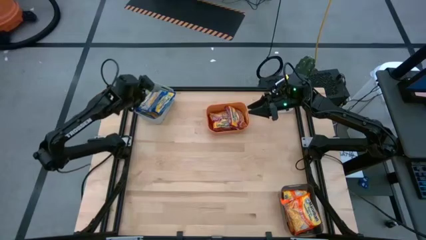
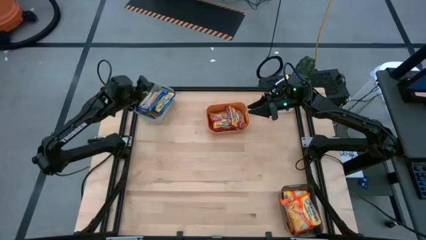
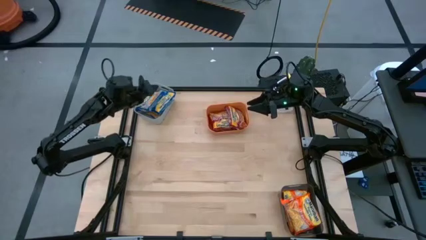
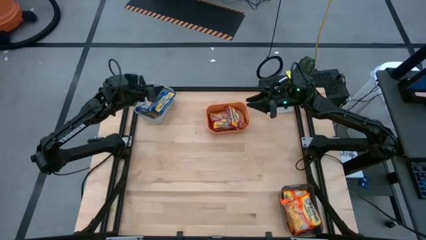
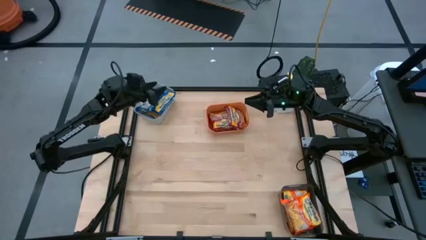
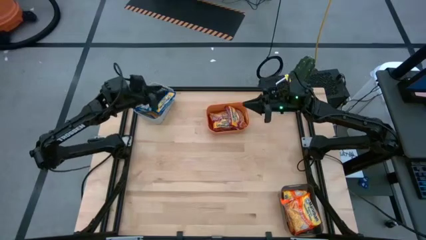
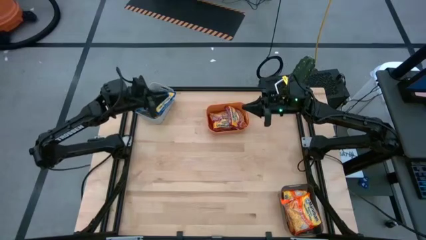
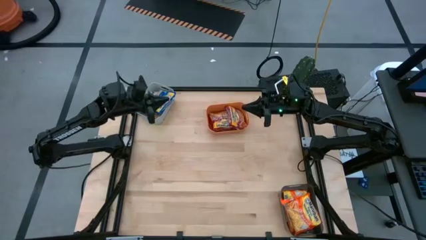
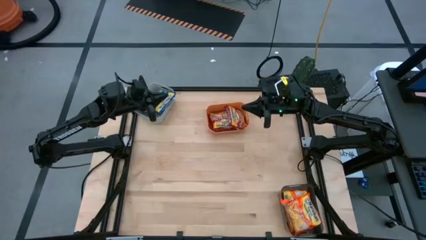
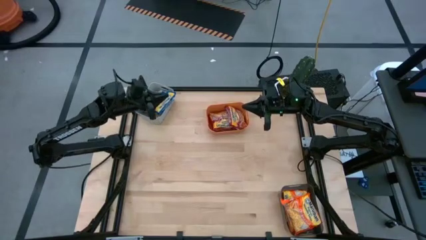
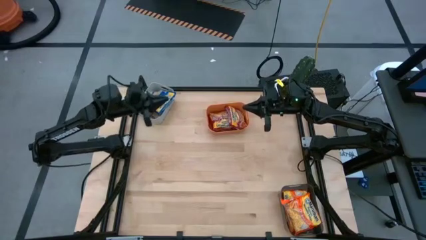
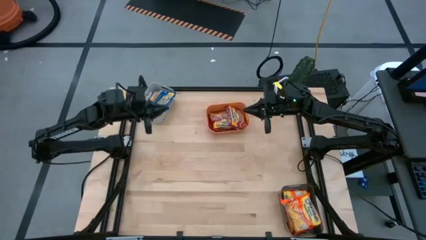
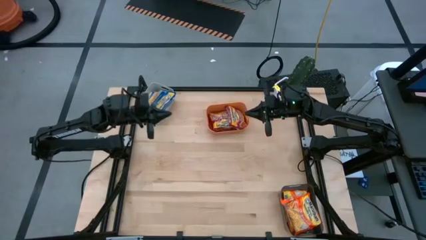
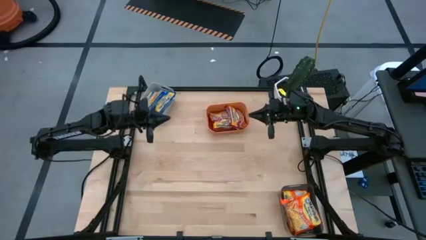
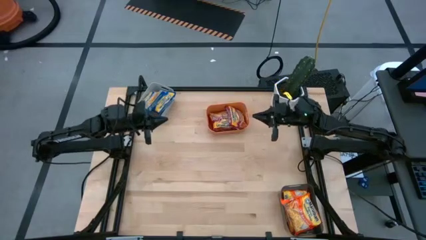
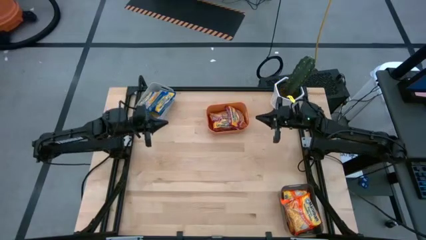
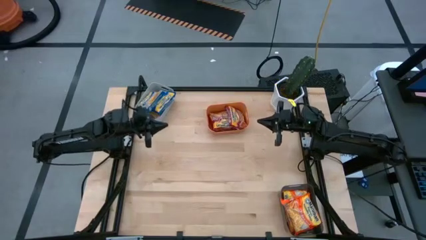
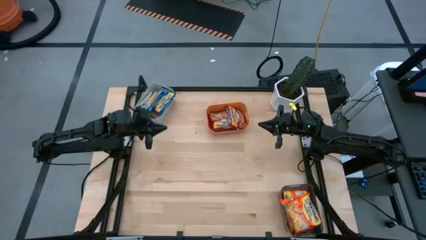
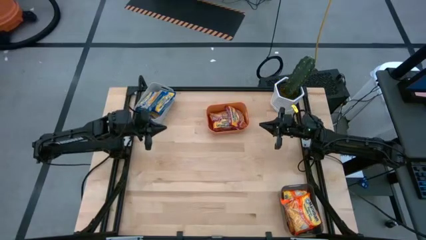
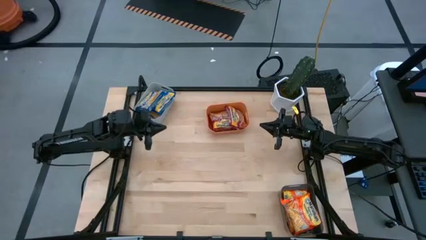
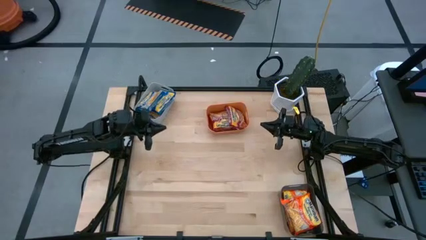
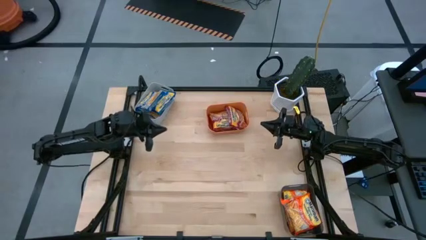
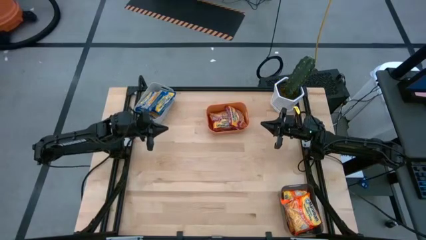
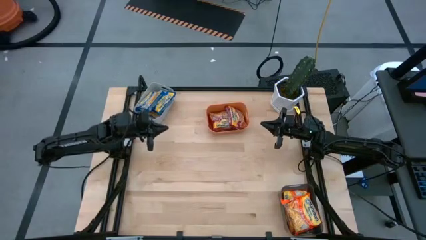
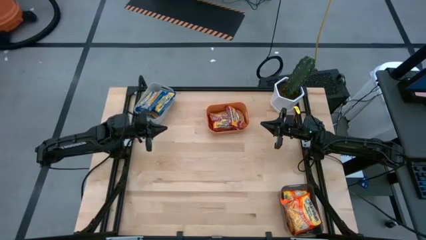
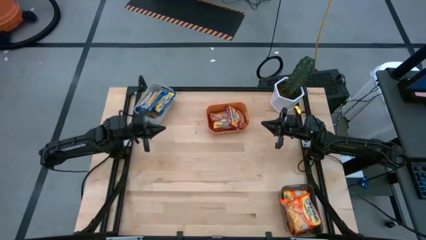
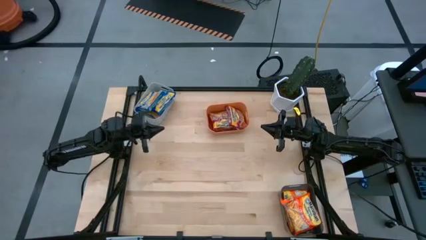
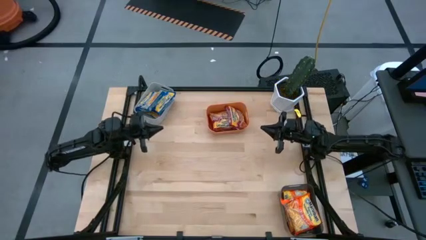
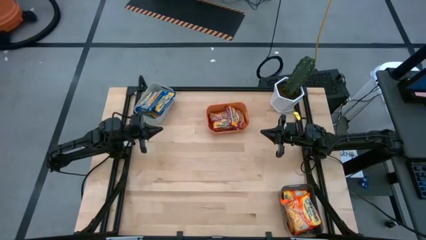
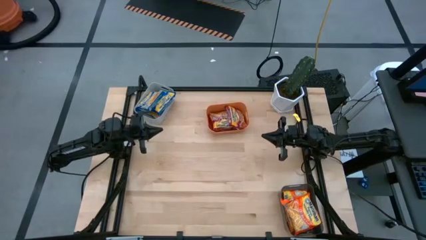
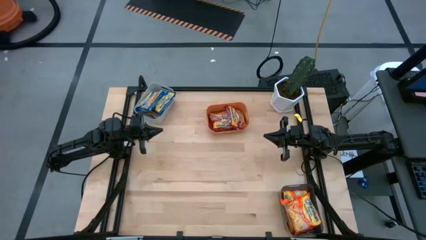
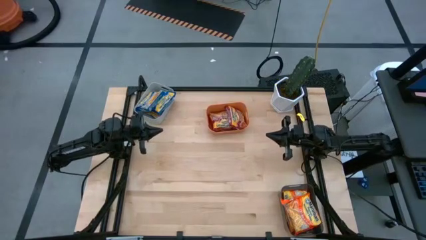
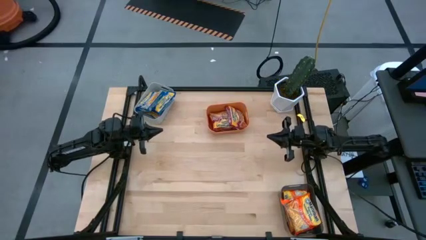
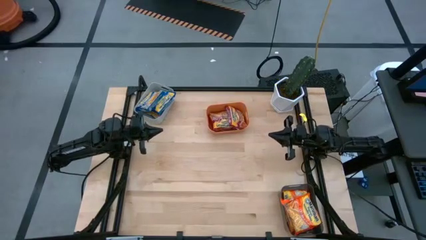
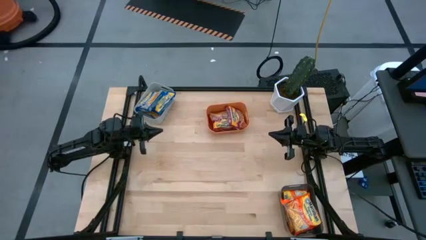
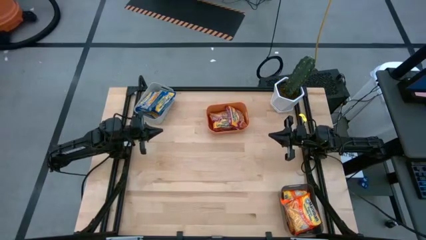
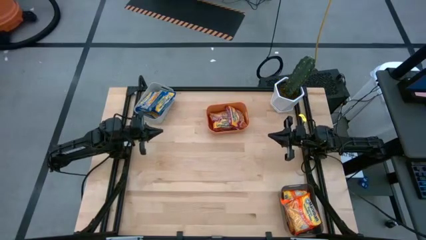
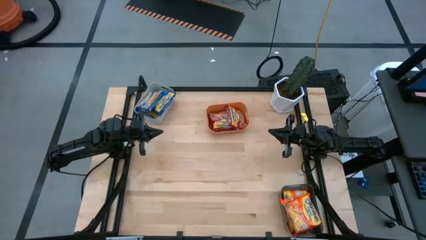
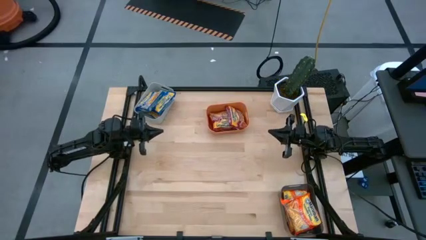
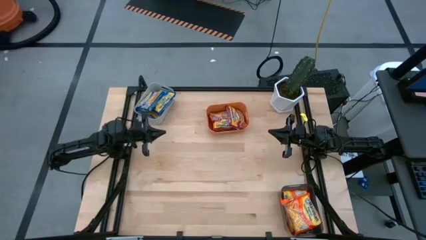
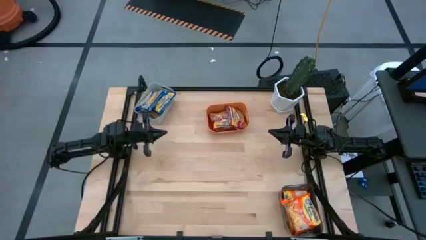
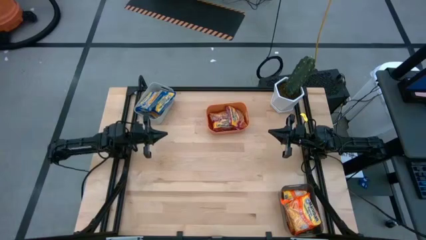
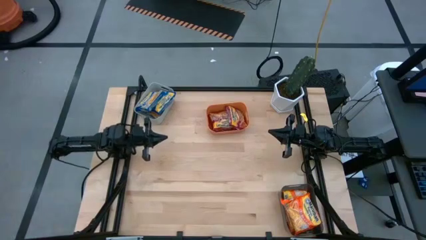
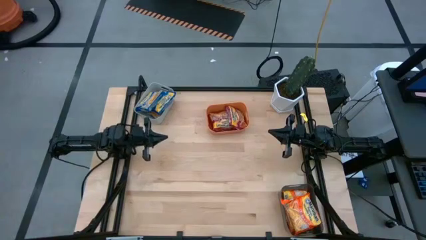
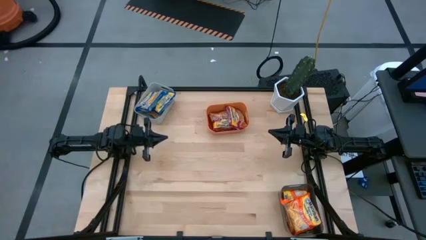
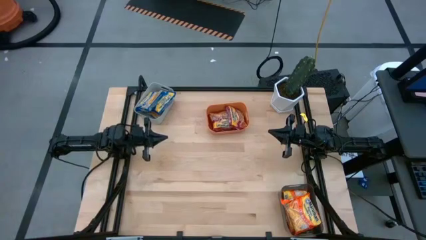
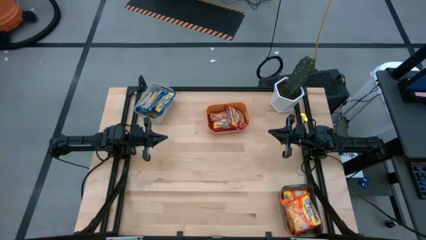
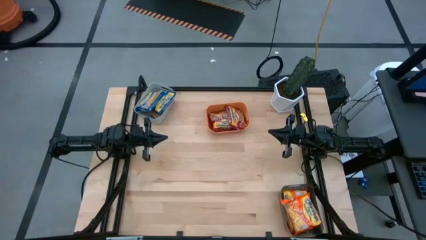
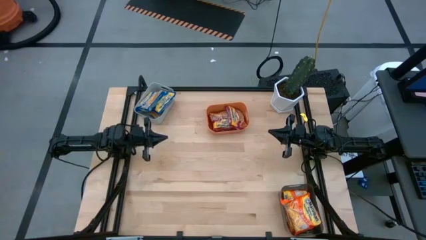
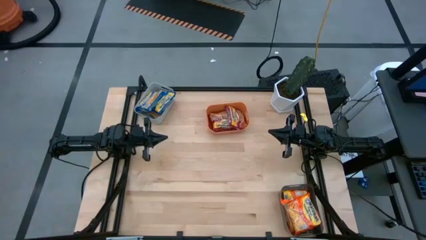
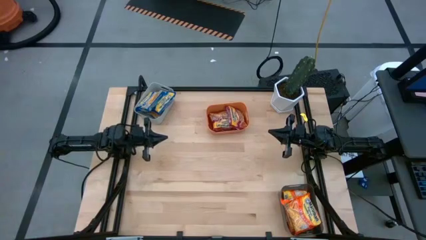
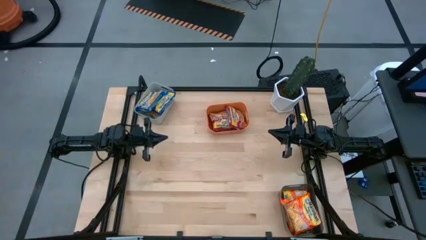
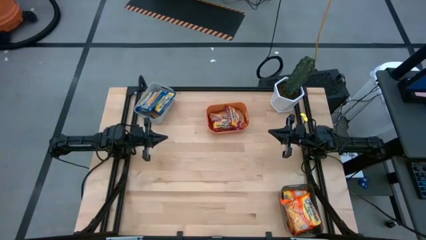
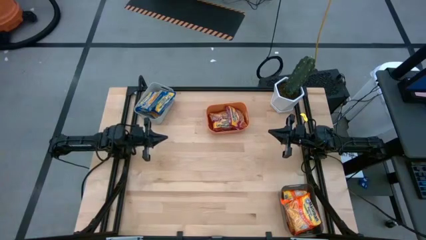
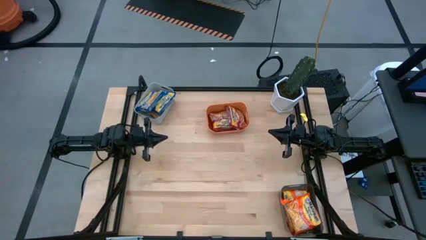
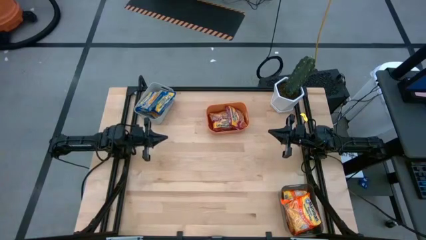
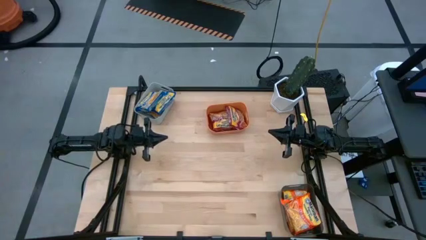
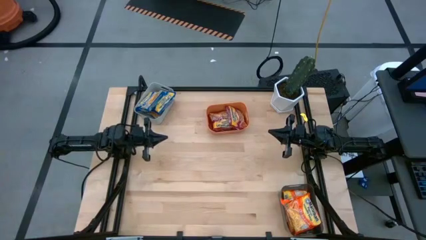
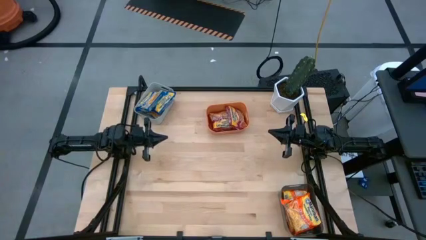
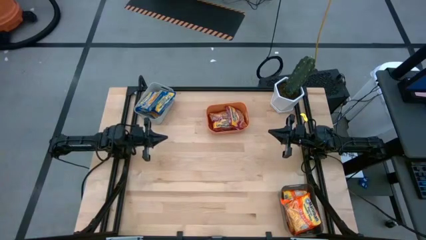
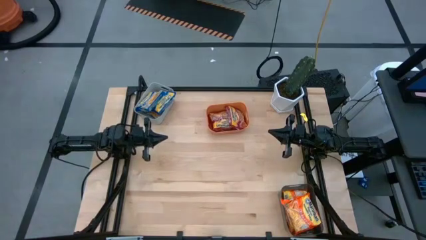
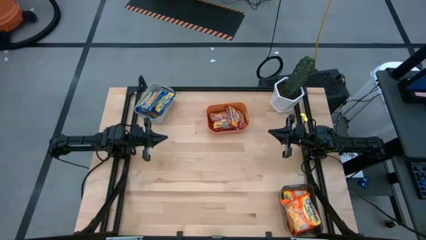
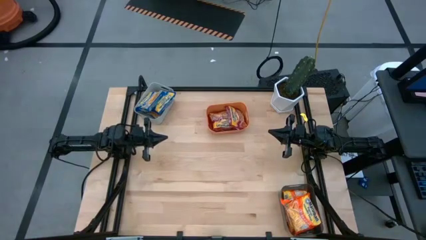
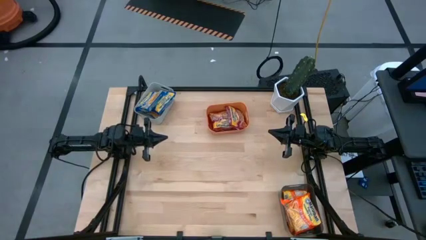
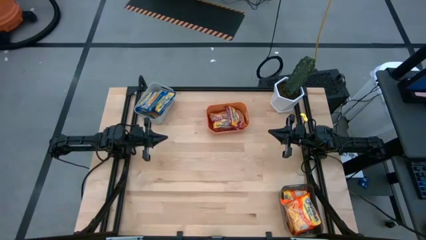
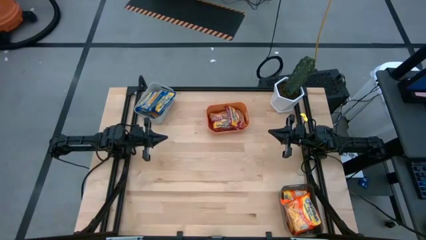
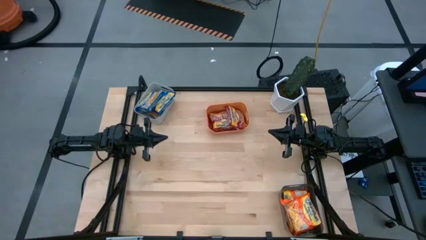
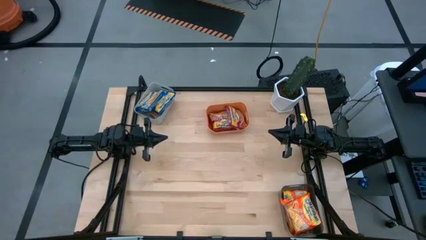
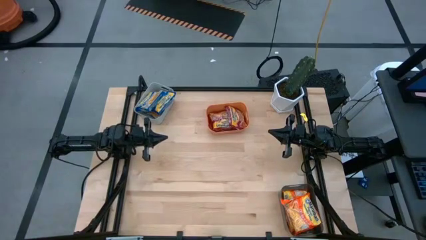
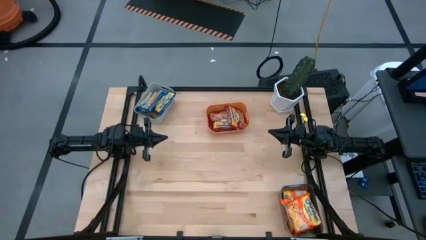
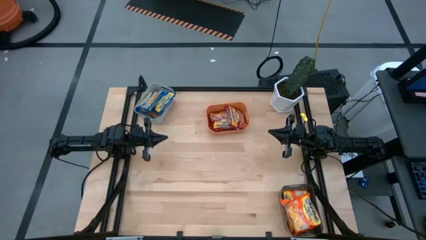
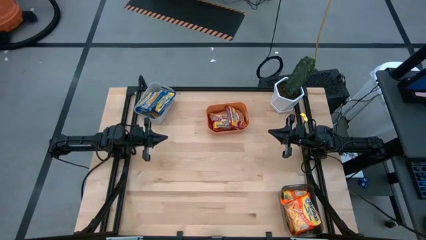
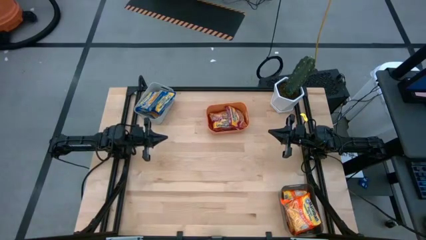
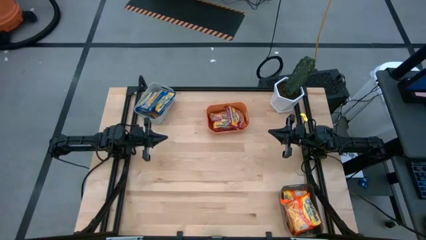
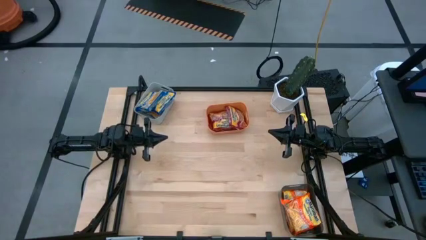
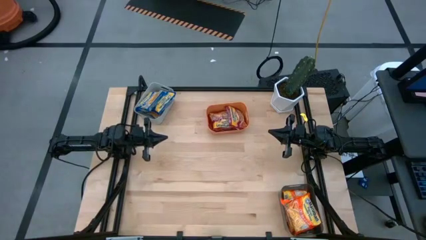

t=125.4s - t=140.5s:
Task: Sort Maruchan noodles
Return to Home Position

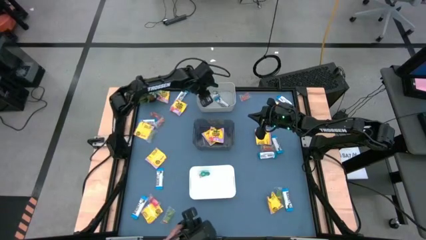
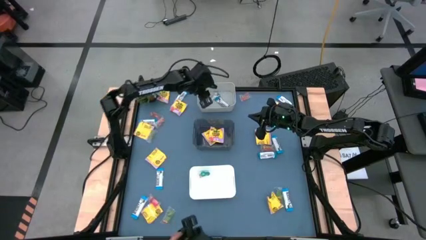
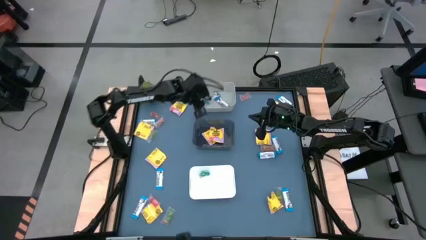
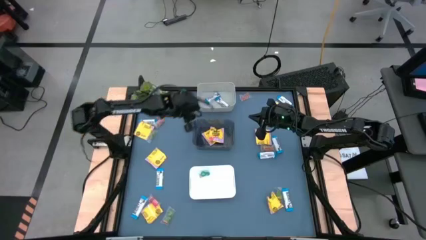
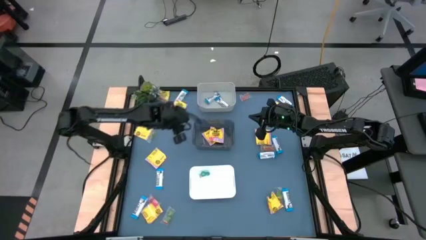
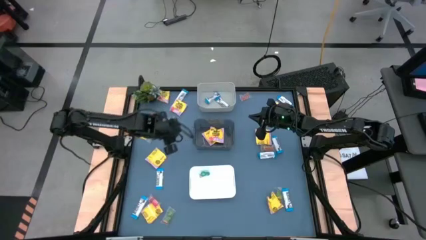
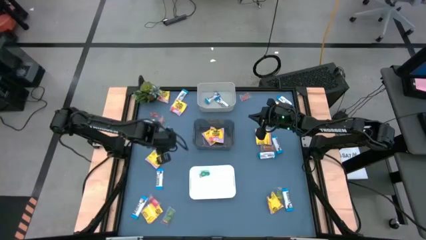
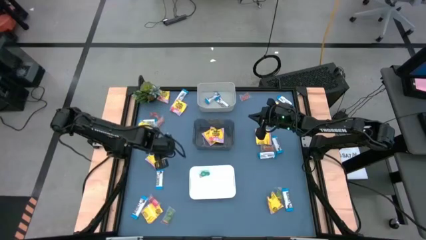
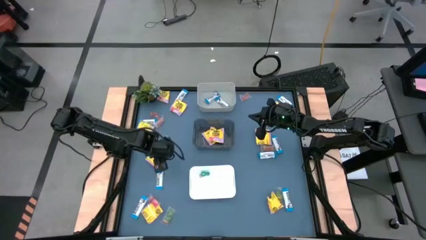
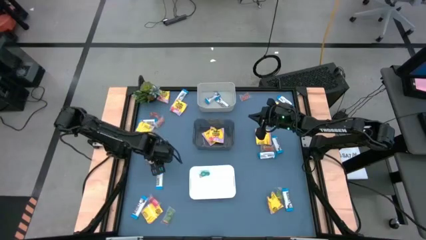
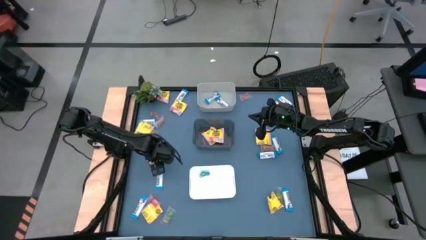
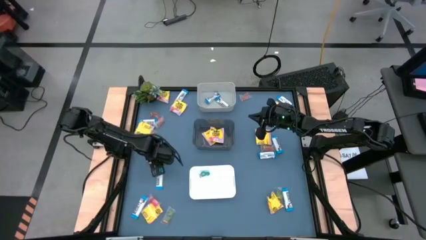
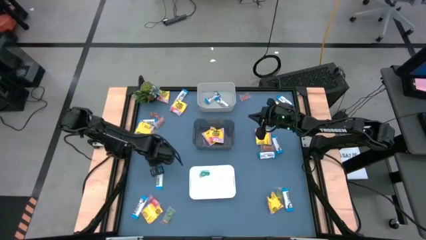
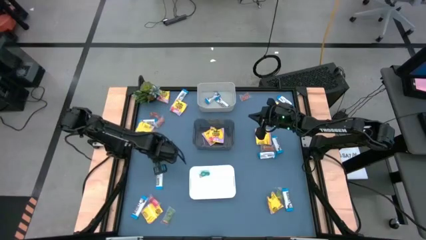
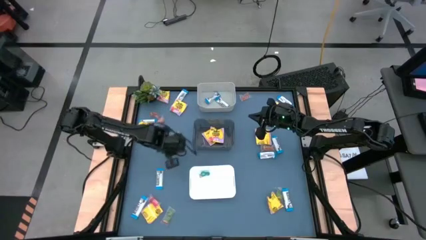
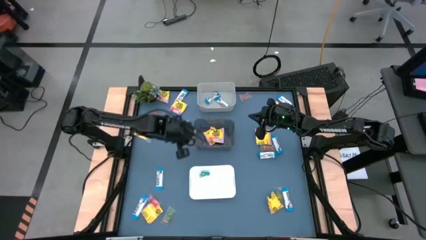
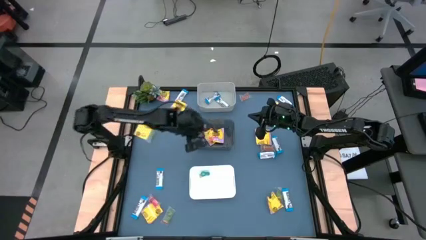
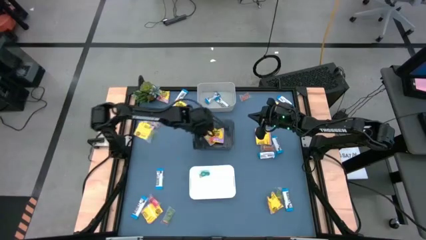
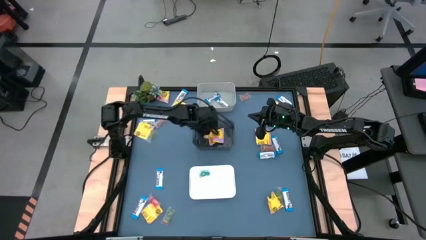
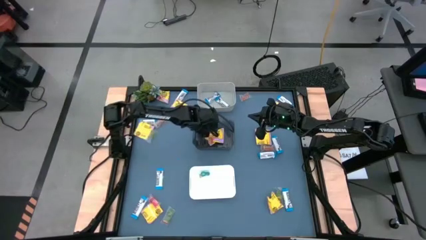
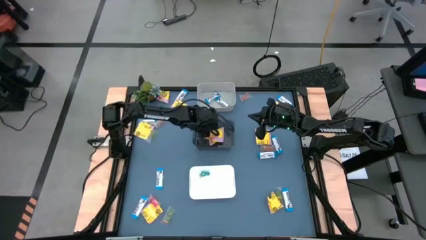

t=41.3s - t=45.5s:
Task: Sort candy
Put the yellow candy into the black bin
